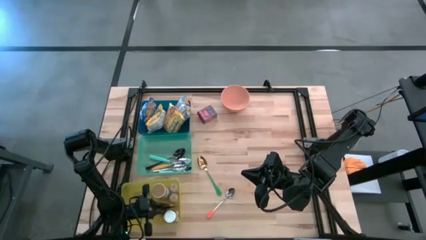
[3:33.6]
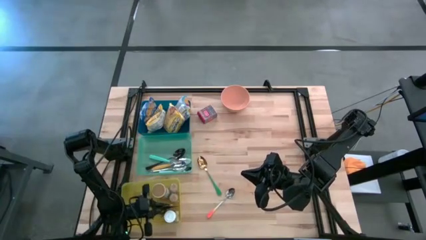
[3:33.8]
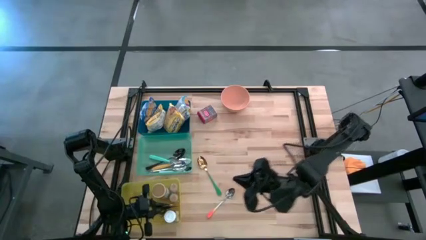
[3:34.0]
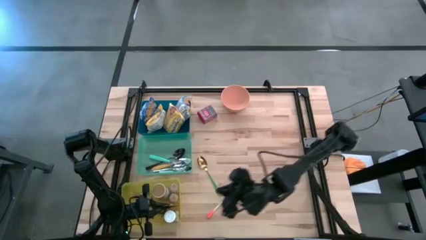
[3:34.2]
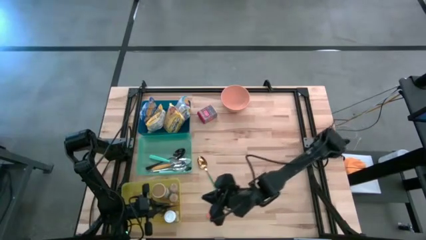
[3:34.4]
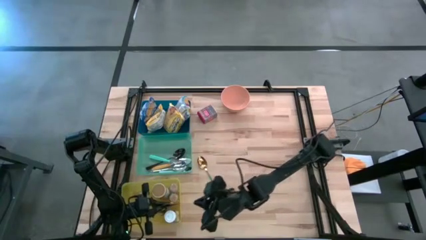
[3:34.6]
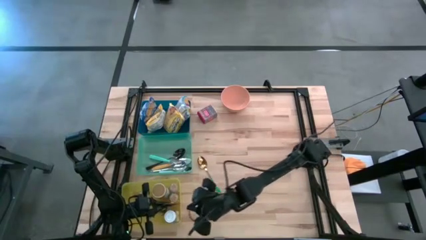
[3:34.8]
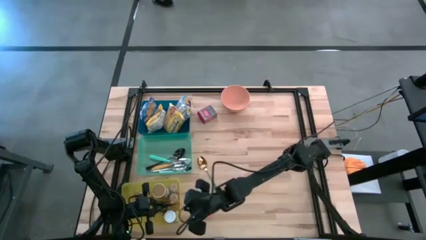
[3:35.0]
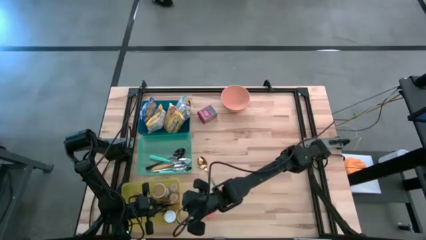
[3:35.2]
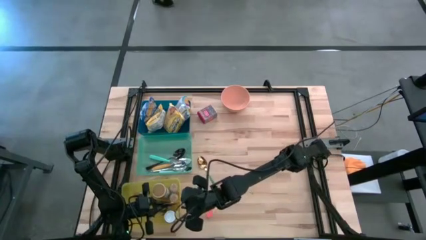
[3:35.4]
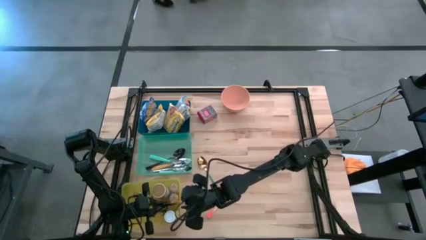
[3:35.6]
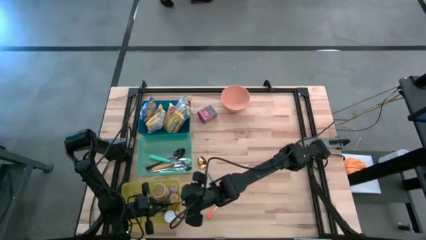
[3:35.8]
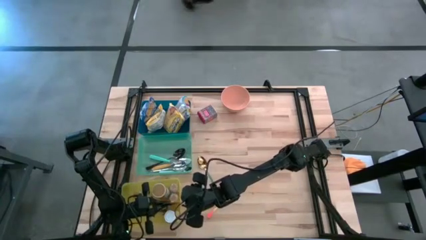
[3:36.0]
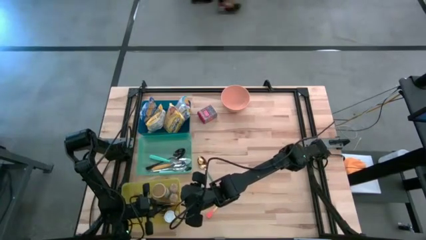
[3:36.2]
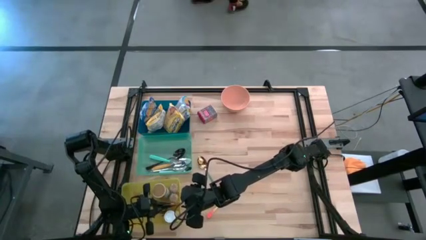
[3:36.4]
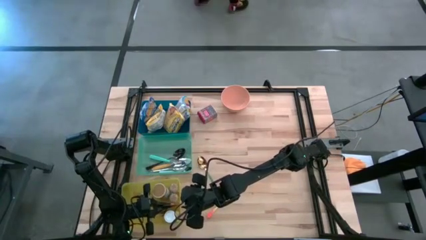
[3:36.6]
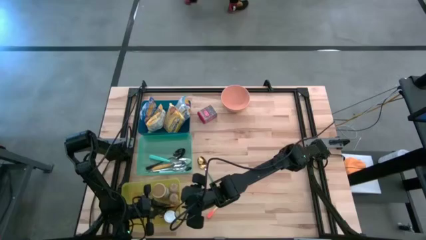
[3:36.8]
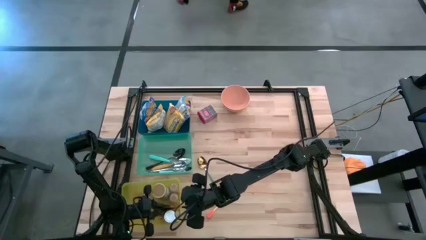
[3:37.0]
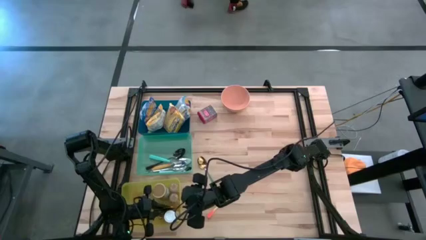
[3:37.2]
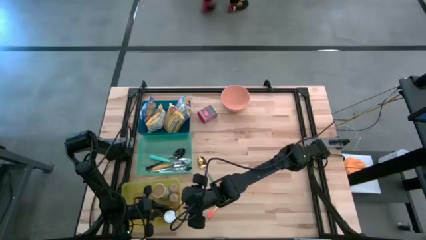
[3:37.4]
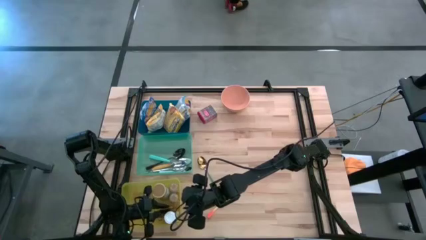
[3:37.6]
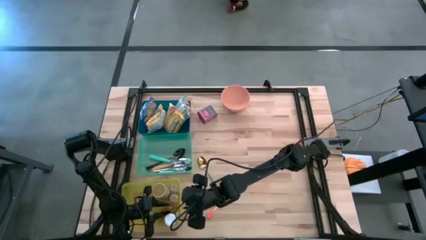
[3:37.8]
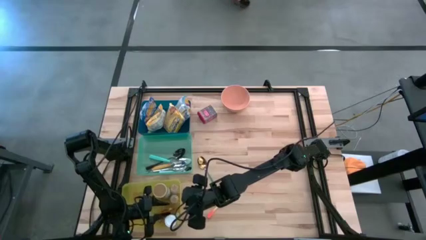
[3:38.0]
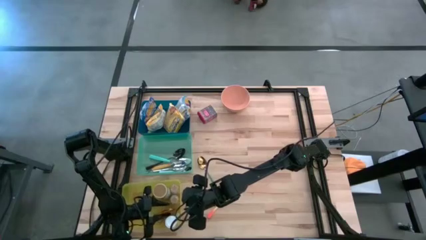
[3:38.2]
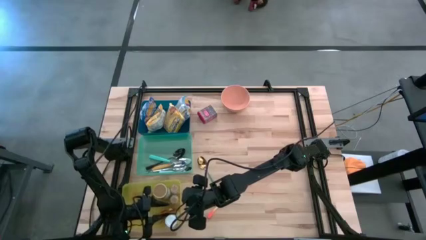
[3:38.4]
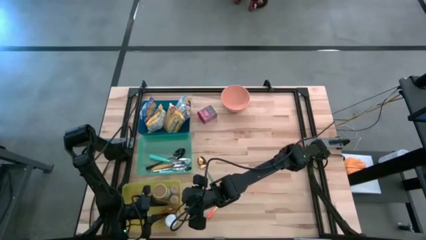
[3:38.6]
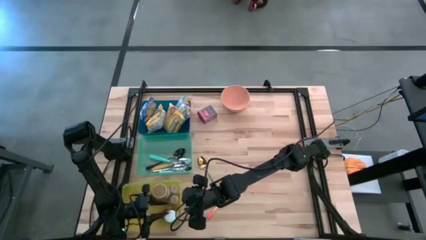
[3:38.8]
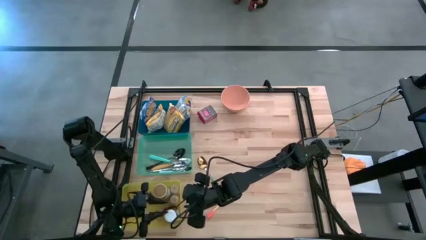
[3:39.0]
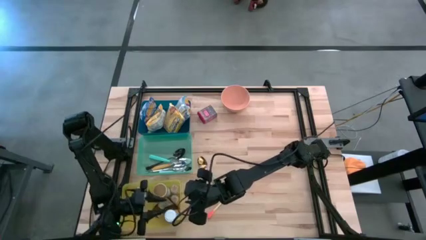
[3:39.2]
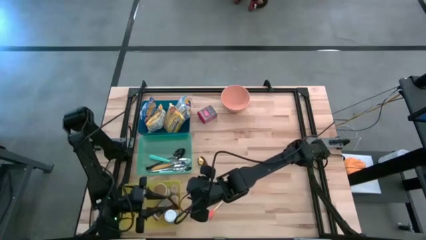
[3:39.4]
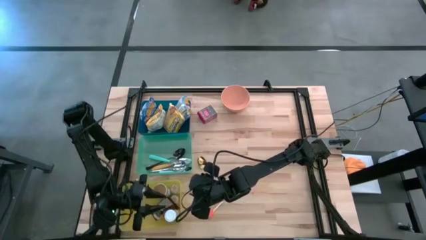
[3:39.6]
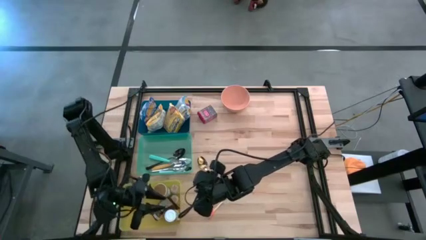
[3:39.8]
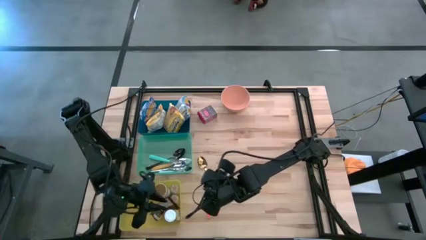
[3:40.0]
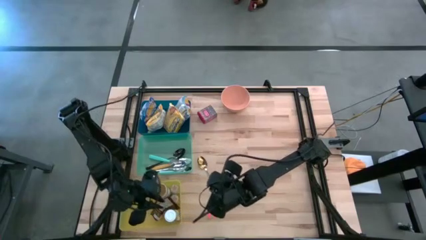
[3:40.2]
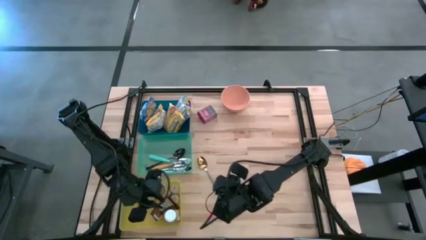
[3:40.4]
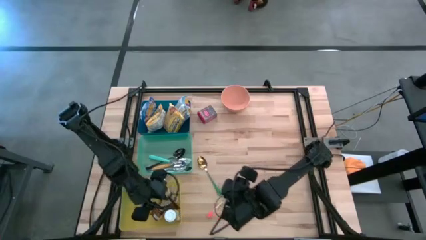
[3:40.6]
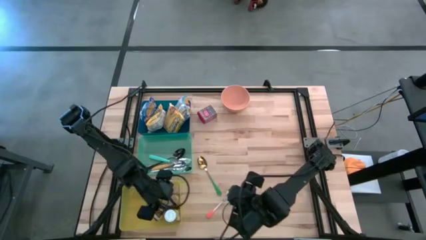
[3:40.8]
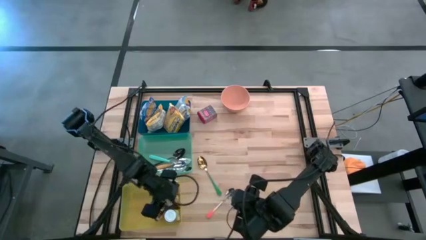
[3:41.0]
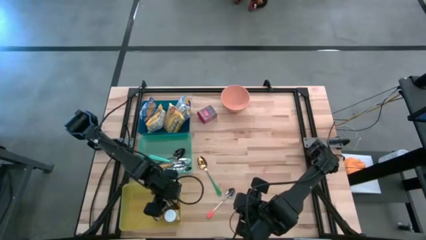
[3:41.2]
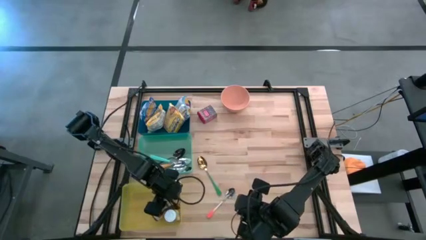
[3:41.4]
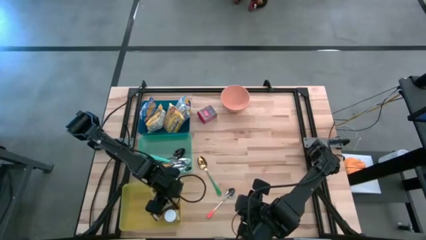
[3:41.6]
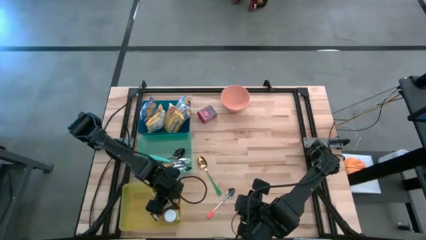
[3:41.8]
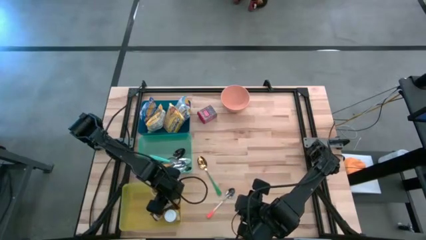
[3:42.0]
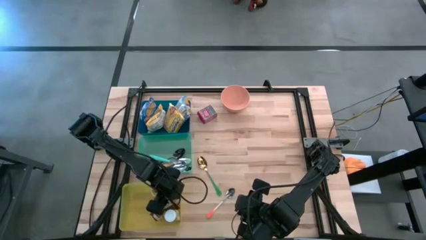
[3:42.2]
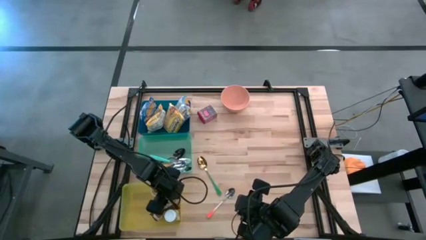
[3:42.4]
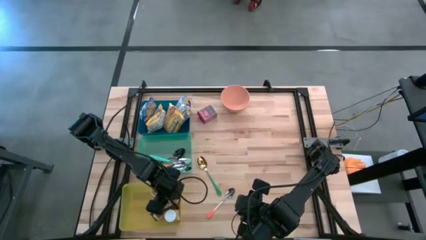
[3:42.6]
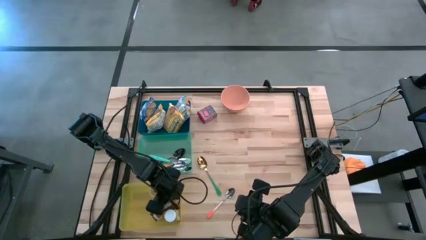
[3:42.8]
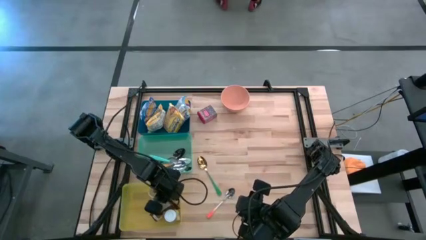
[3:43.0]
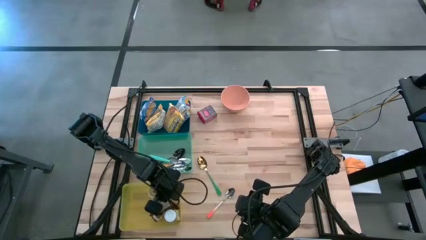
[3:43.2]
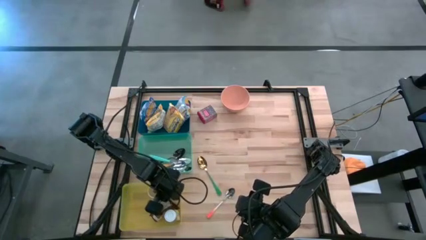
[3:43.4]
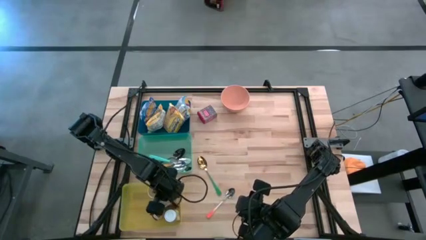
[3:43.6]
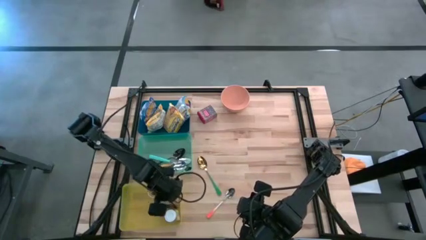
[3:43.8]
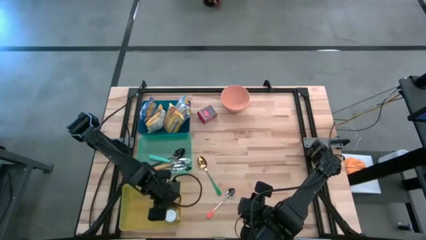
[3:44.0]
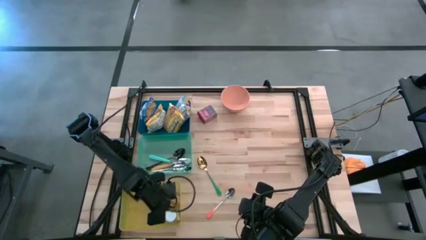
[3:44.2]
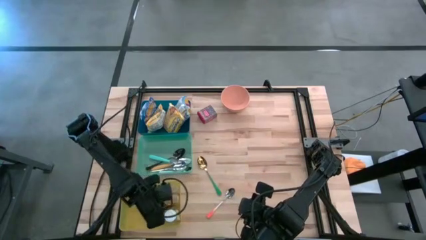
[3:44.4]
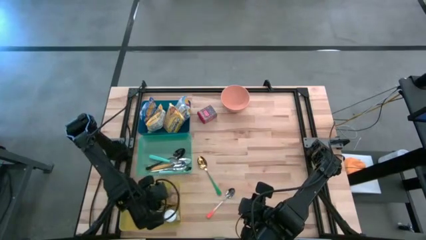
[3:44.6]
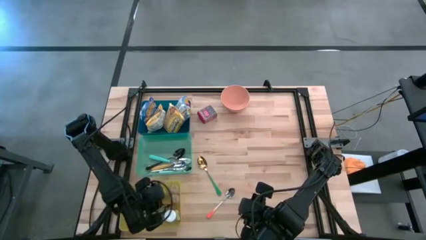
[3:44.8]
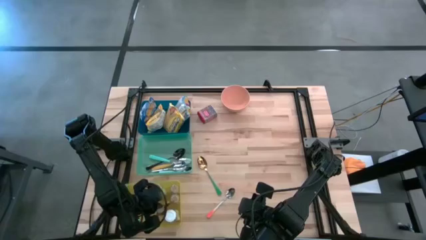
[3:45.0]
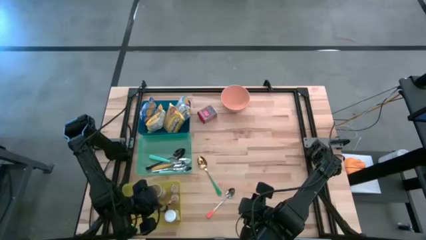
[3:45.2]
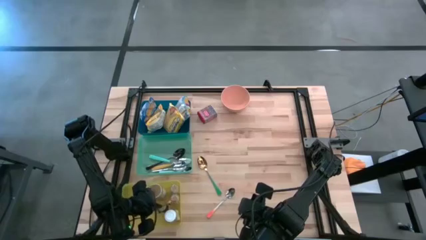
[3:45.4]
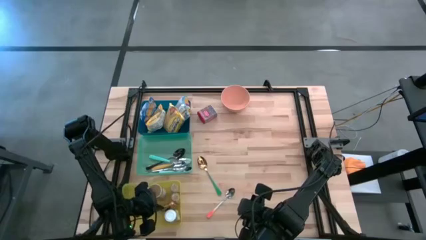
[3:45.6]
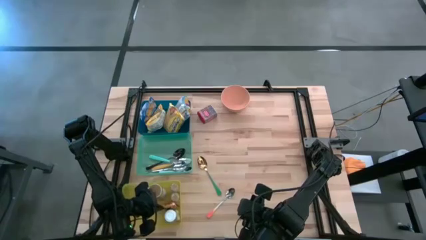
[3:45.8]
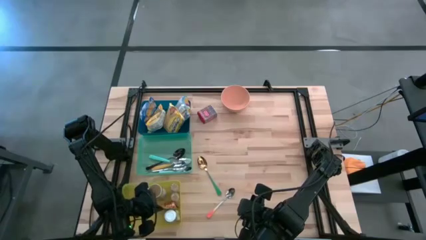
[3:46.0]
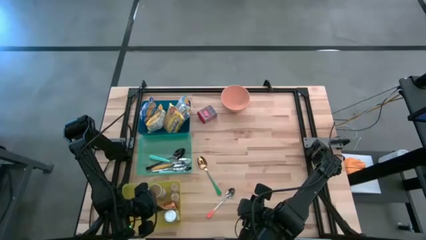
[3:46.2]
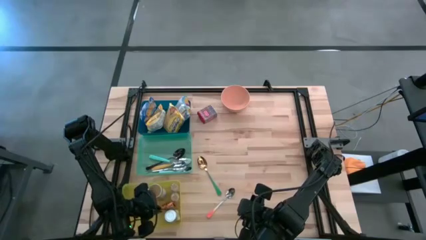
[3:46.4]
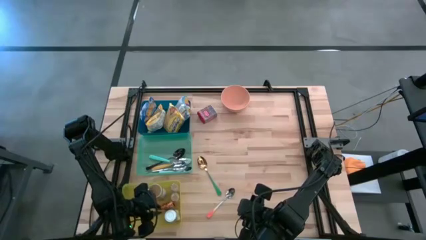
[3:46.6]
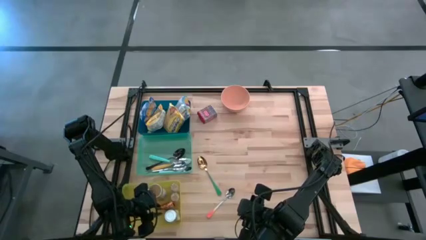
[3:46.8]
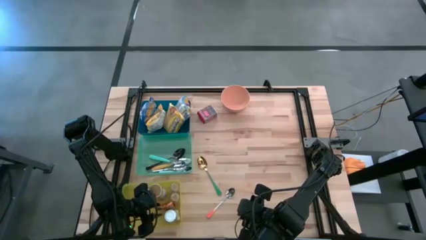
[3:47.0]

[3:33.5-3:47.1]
Put the orange spice pack into the yellow bin
